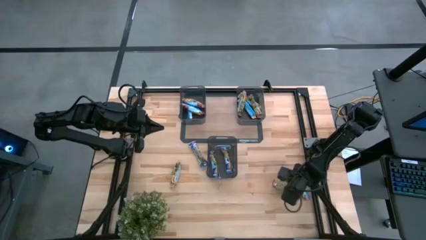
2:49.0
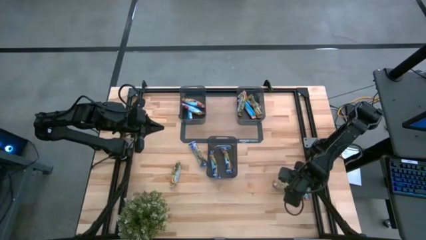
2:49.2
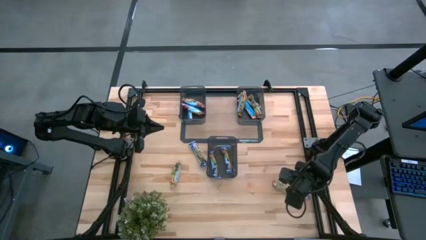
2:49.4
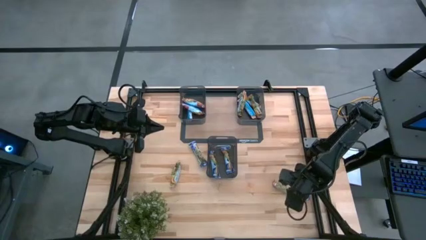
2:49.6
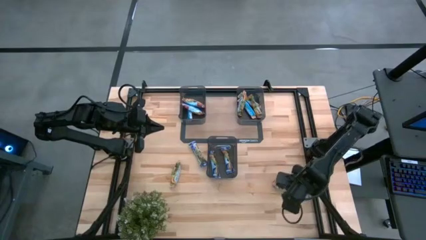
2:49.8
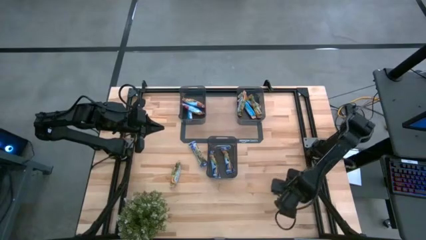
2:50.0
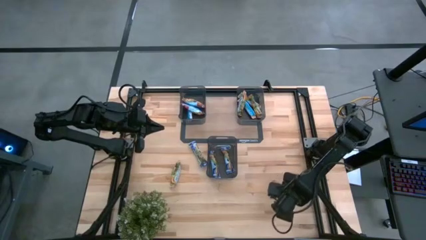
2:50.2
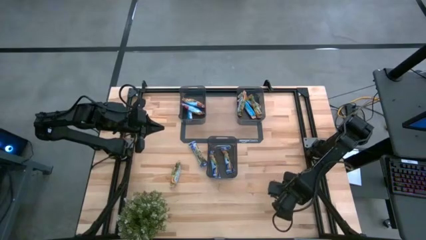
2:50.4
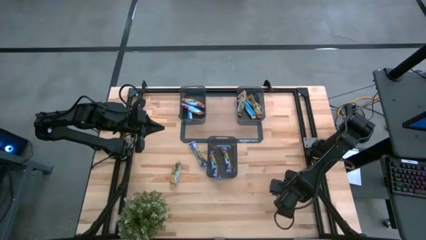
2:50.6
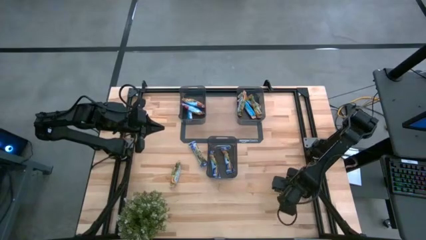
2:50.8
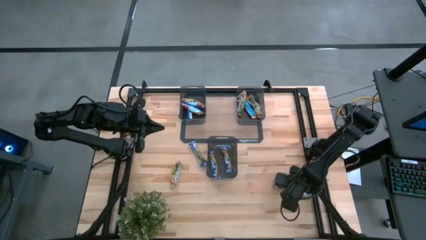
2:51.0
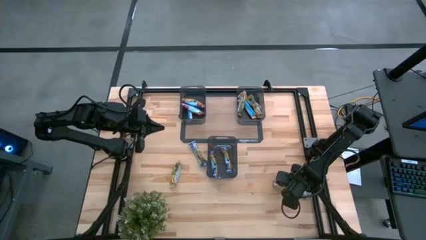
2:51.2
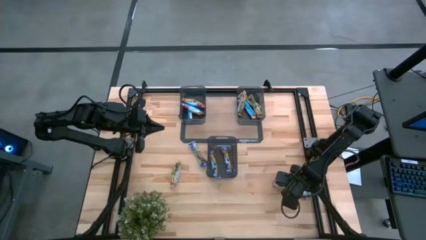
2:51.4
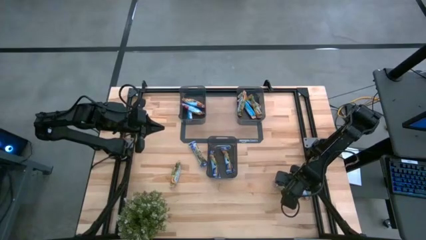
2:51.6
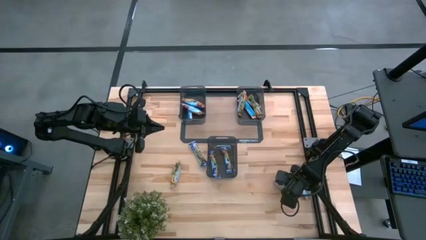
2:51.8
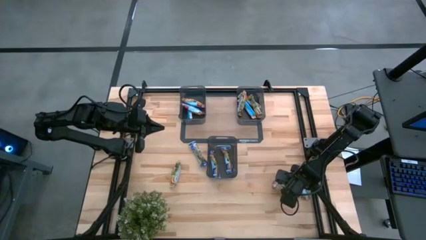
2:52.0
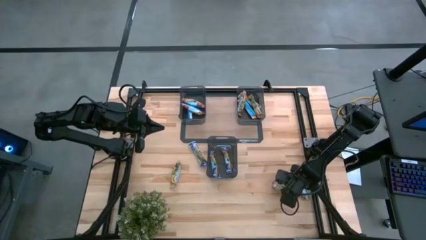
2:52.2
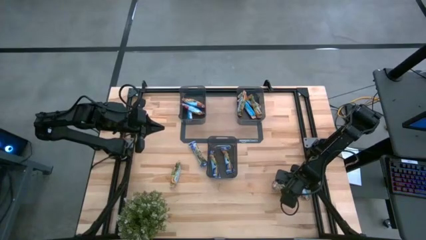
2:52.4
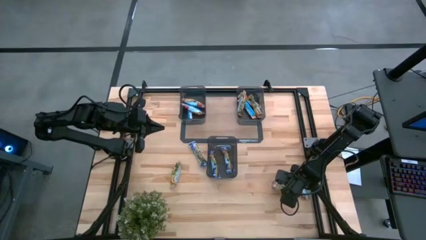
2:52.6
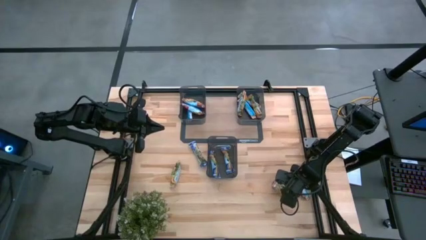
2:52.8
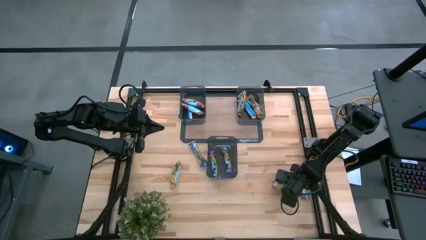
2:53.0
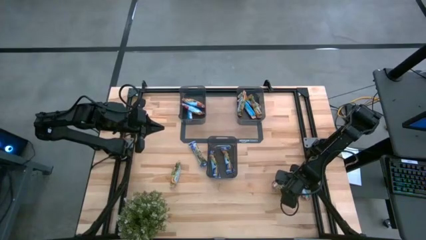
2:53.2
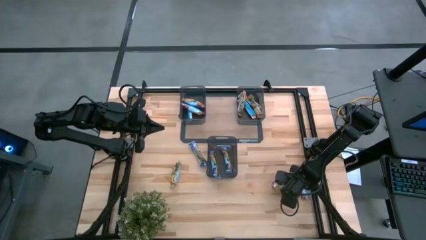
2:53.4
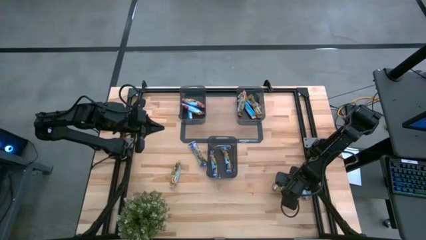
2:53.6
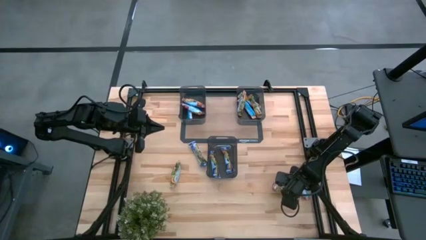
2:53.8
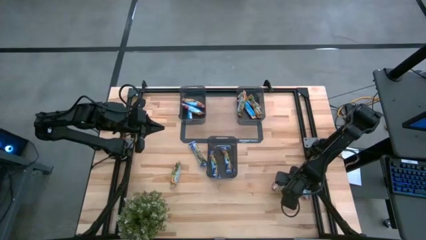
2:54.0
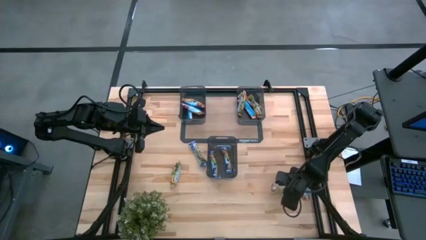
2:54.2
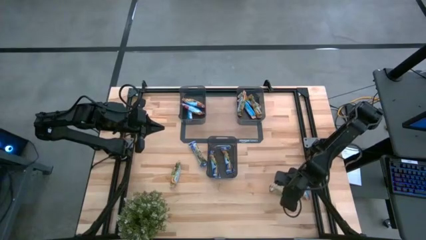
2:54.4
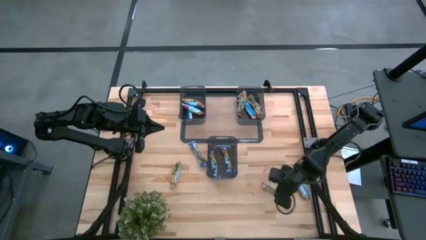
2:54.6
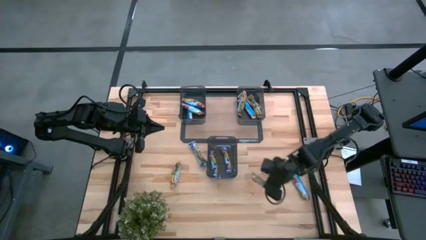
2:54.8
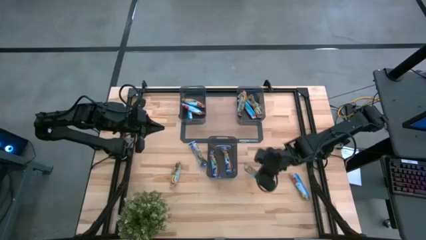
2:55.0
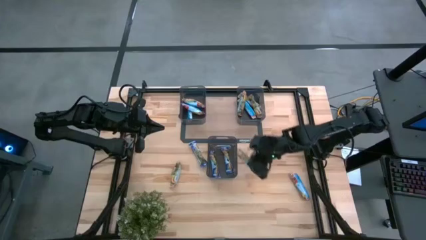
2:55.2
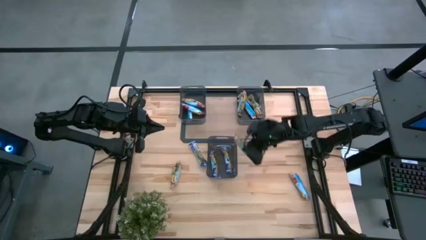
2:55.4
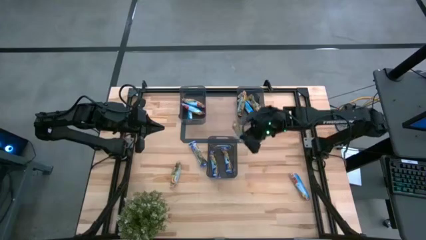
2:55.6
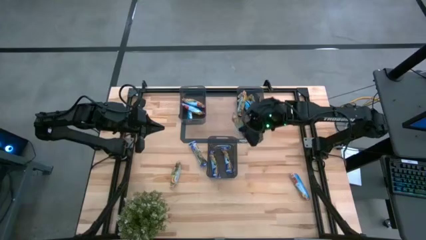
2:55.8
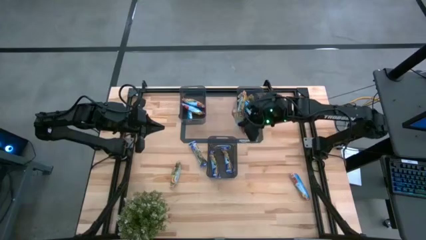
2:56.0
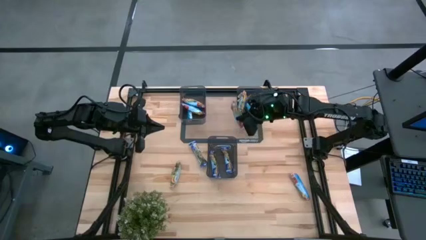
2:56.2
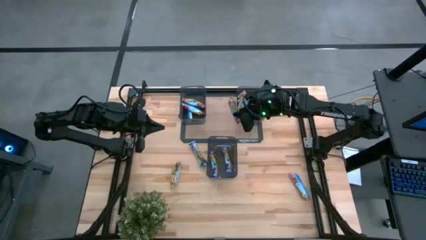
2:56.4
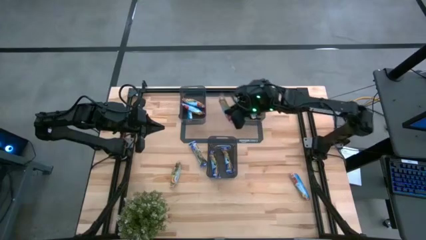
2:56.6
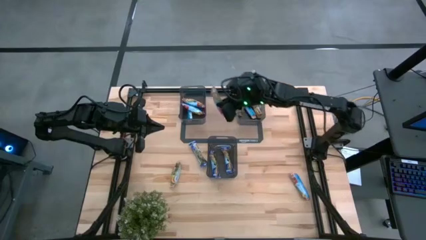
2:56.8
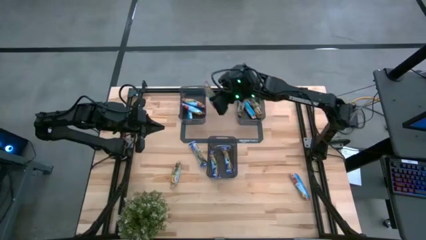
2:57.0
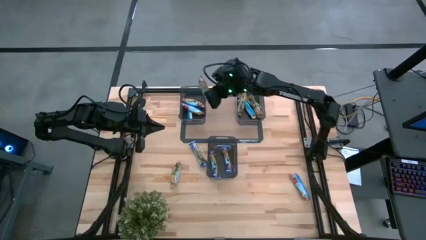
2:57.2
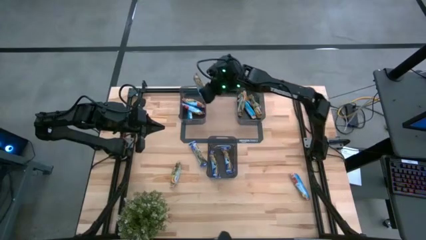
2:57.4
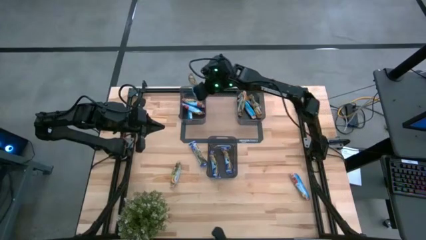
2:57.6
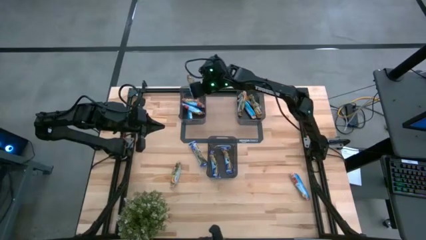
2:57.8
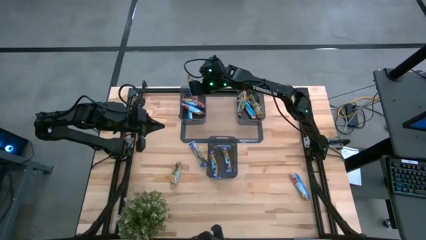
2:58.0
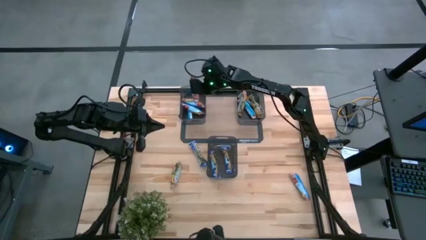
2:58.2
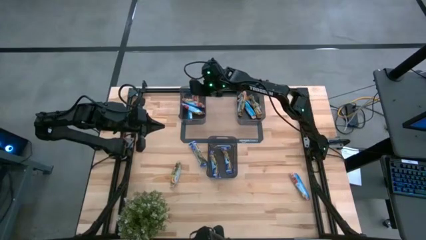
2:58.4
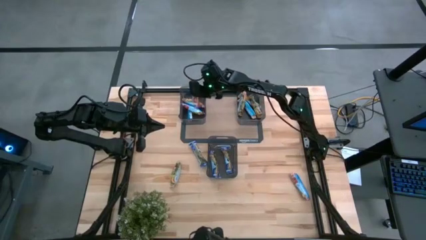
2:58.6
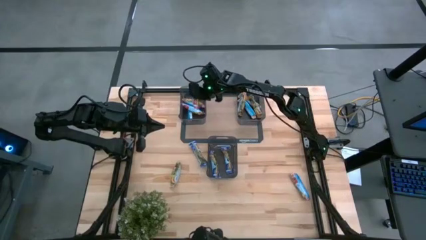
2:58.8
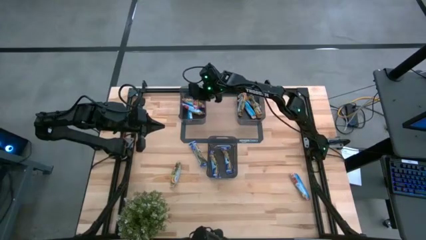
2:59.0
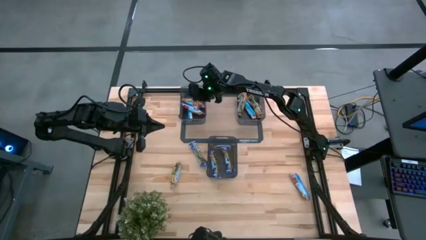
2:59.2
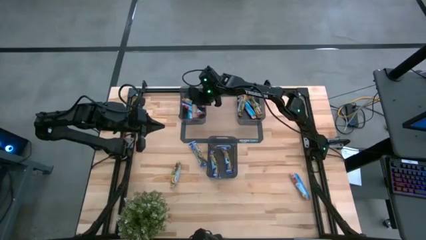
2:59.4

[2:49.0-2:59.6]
Task: Pick and place Granola Bars by type
Put the red granola bar into the left black bin

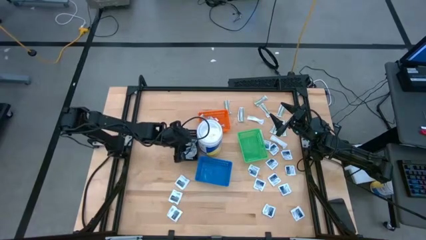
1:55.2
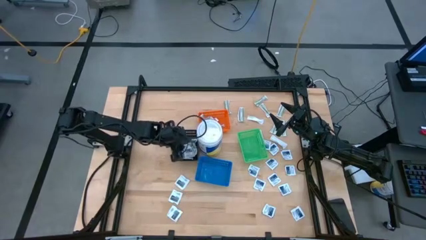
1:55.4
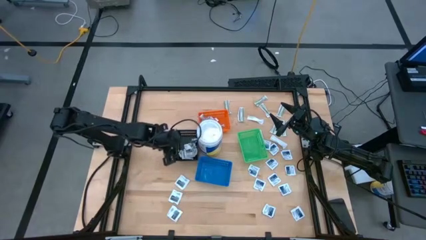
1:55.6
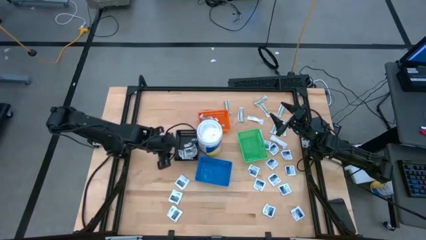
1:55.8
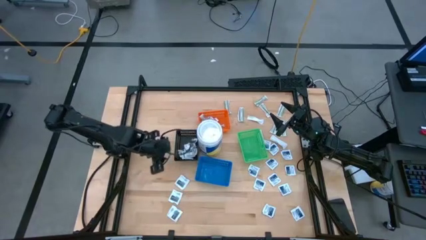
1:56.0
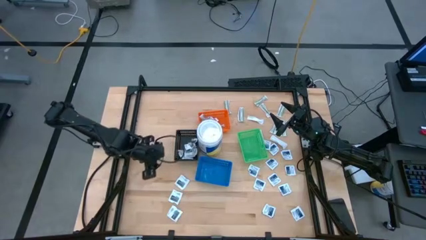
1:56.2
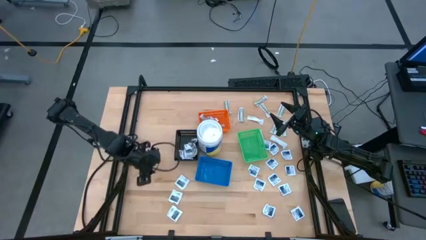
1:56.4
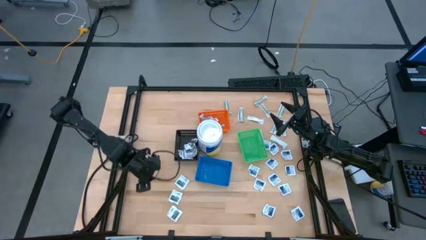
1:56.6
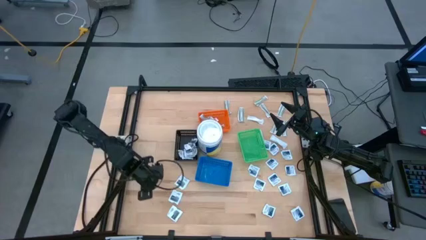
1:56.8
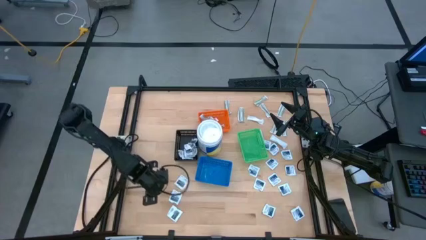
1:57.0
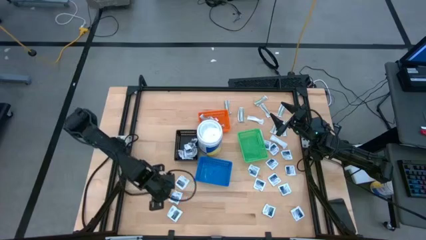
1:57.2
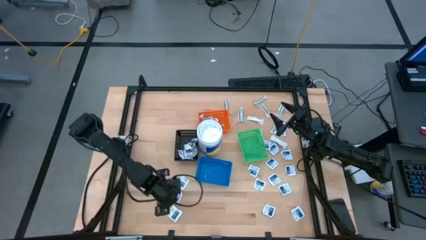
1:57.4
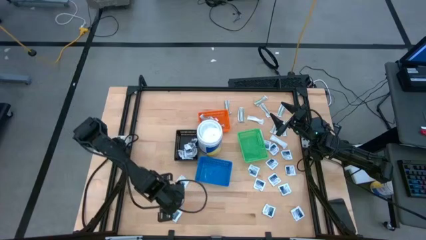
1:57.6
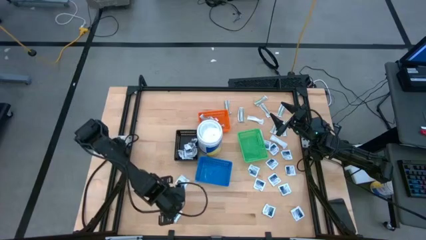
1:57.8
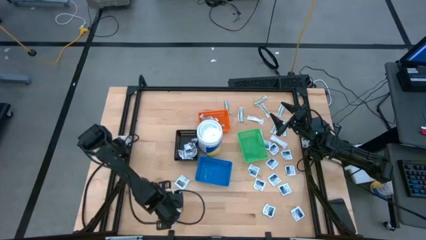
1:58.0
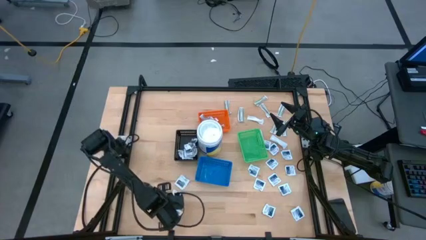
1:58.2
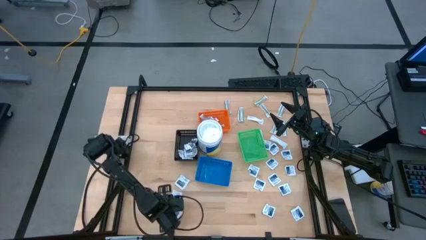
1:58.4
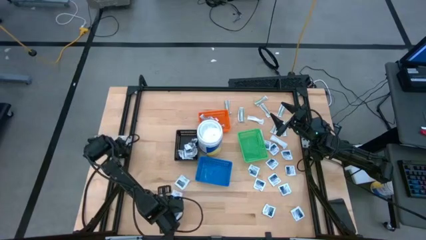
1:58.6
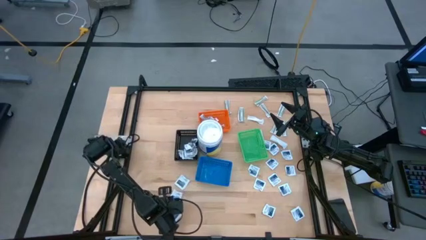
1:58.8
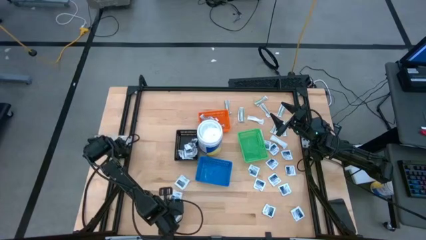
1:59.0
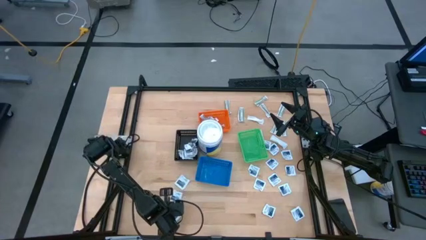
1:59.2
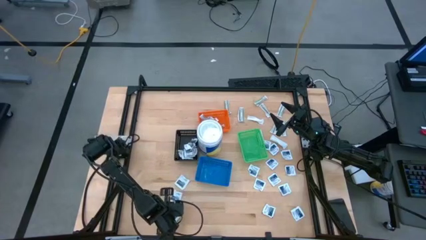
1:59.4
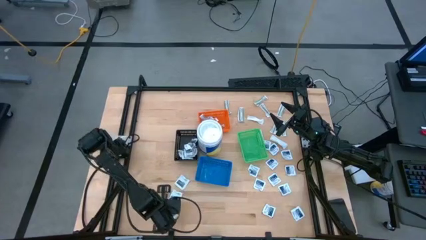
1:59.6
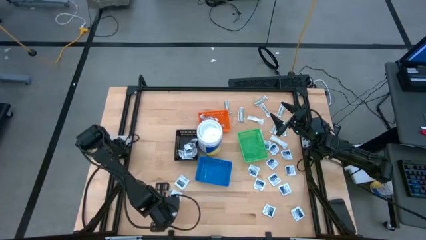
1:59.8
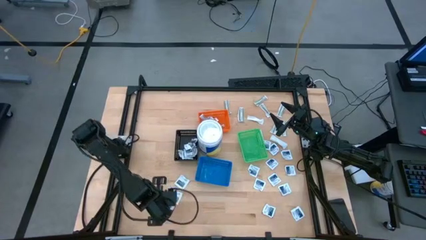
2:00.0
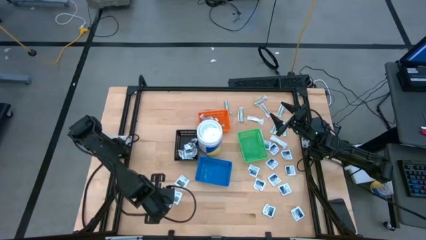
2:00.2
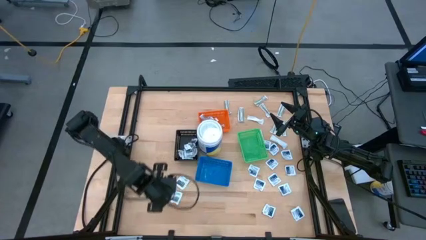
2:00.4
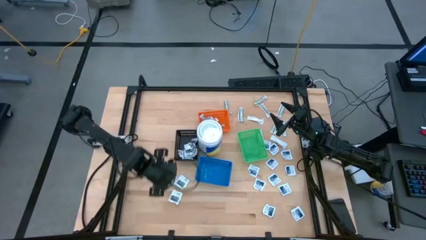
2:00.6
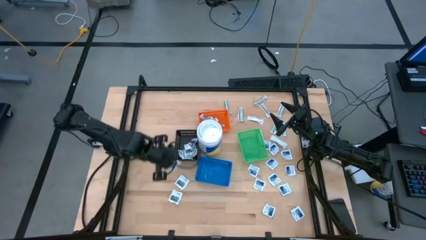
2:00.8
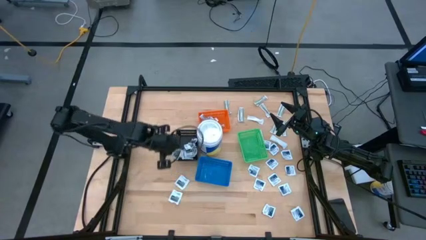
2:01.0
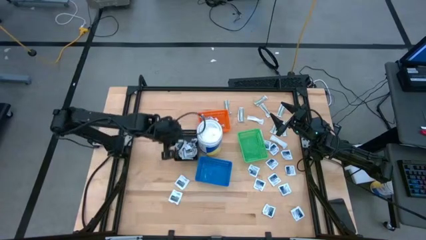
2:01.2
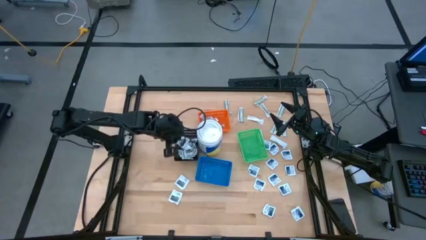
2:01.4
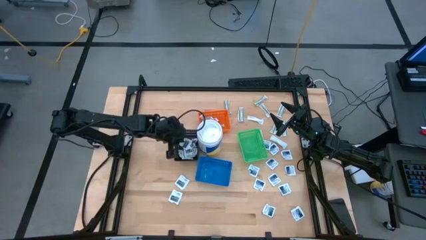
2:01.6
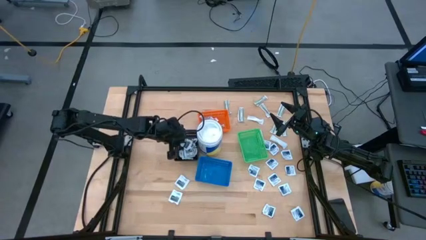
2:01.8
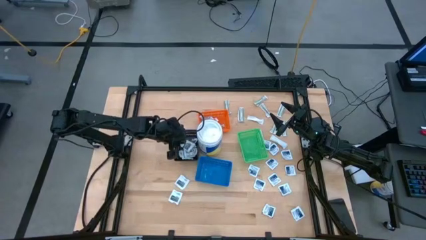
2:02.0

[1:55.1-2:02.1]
Task: Pick & Place First Aid Supplies
Put the gray towelette pack into the black bin
